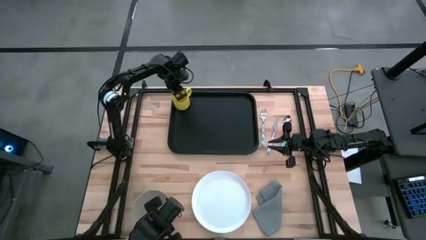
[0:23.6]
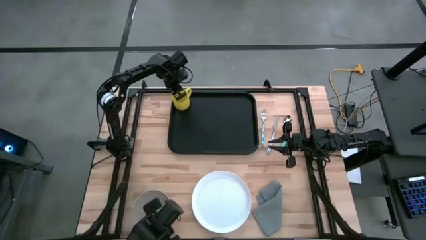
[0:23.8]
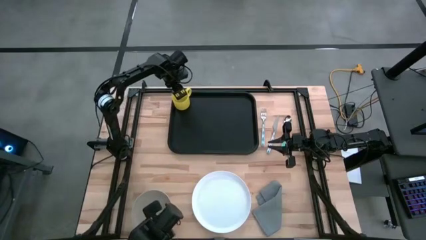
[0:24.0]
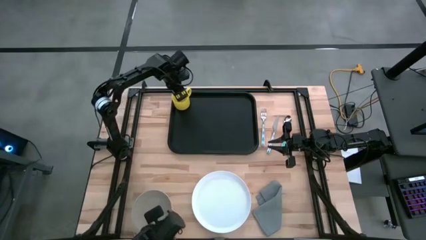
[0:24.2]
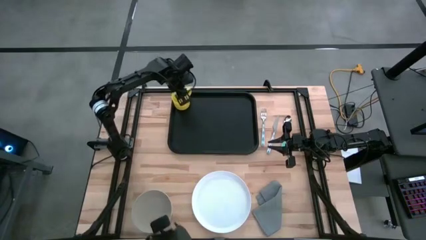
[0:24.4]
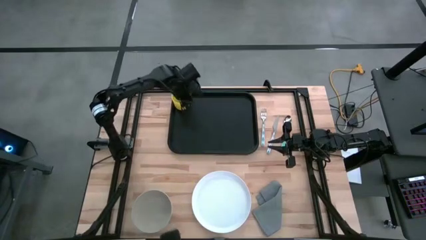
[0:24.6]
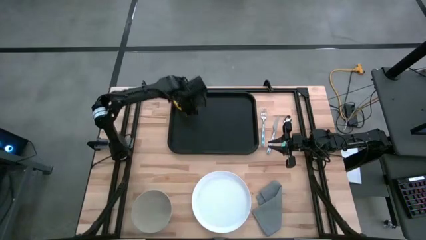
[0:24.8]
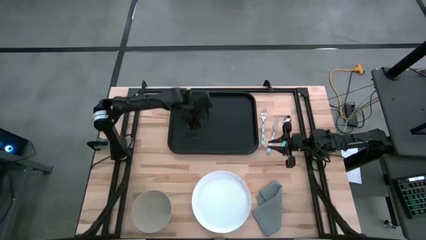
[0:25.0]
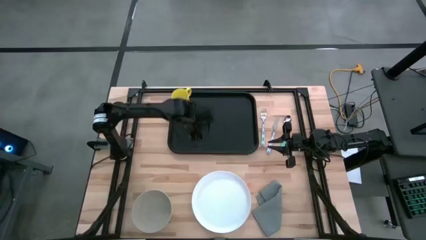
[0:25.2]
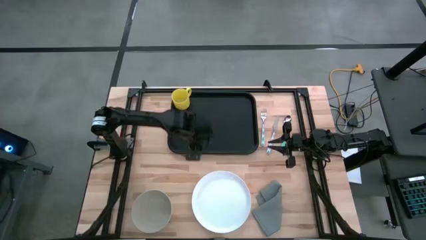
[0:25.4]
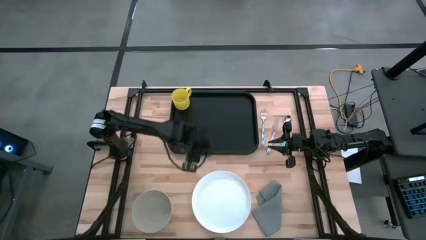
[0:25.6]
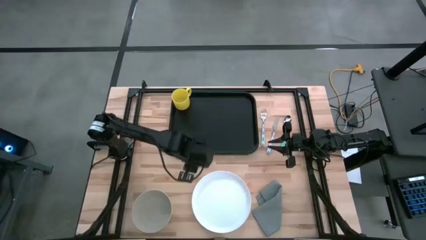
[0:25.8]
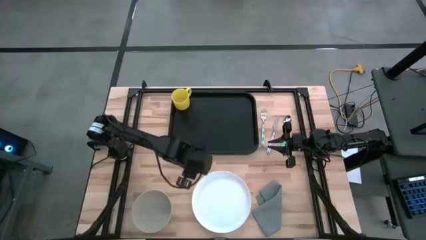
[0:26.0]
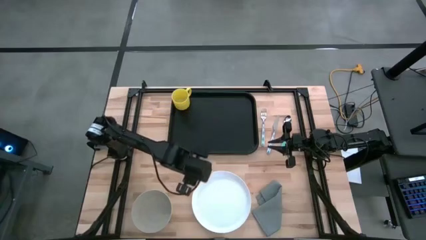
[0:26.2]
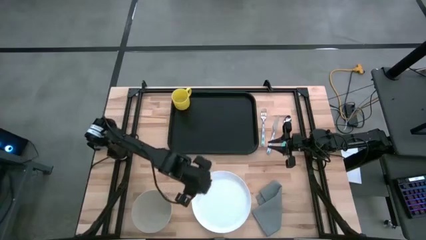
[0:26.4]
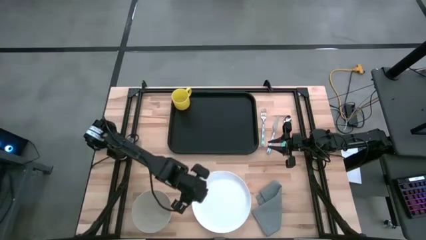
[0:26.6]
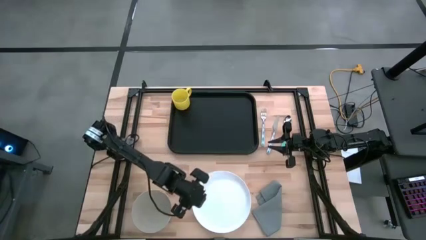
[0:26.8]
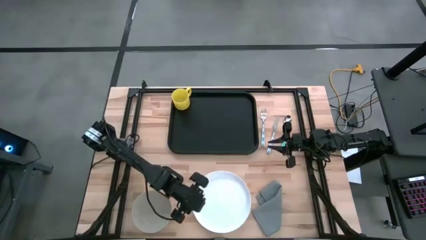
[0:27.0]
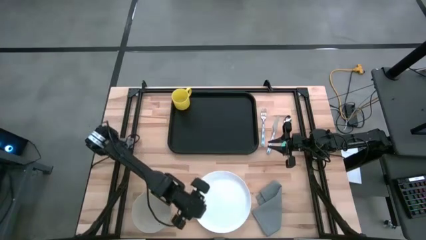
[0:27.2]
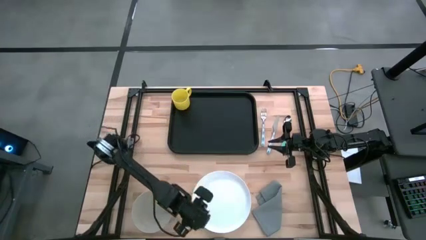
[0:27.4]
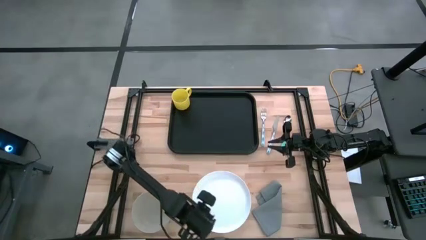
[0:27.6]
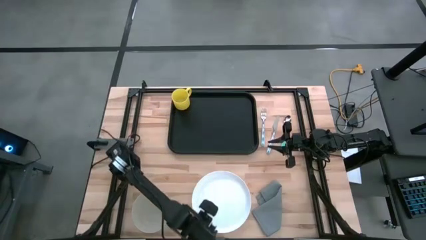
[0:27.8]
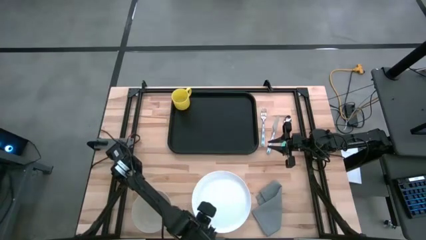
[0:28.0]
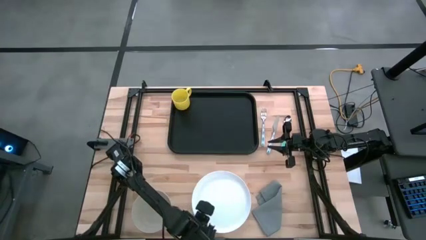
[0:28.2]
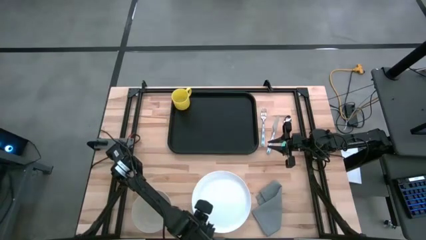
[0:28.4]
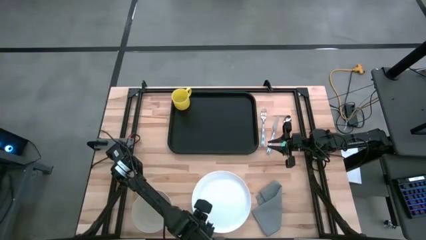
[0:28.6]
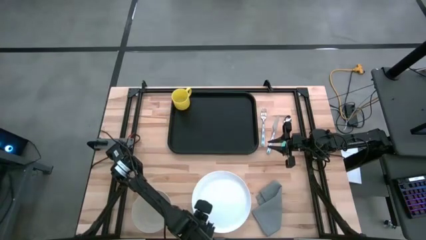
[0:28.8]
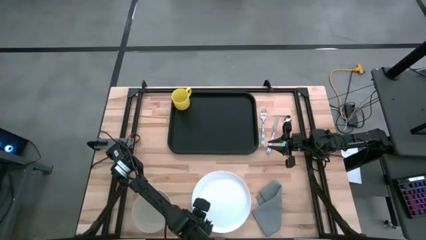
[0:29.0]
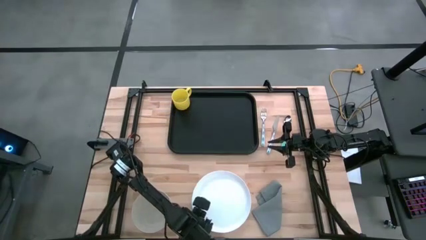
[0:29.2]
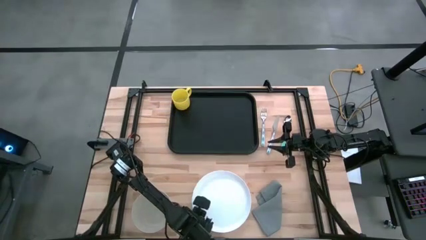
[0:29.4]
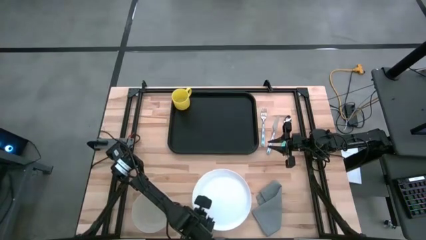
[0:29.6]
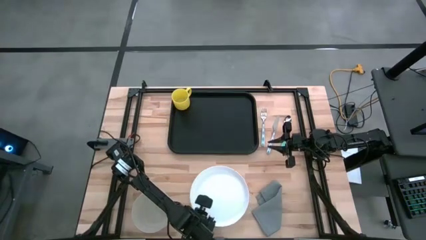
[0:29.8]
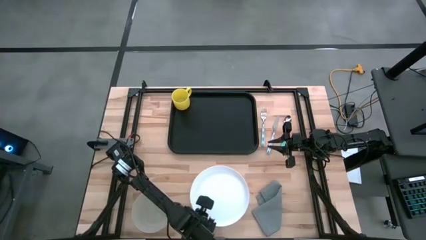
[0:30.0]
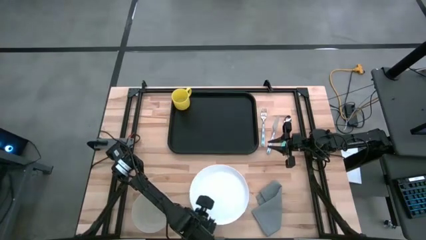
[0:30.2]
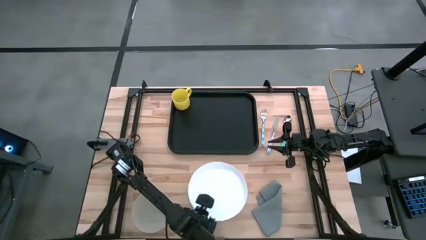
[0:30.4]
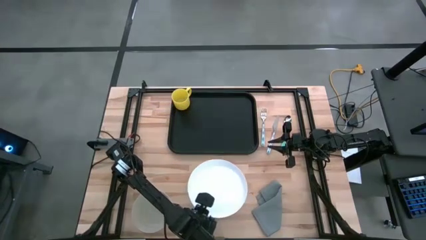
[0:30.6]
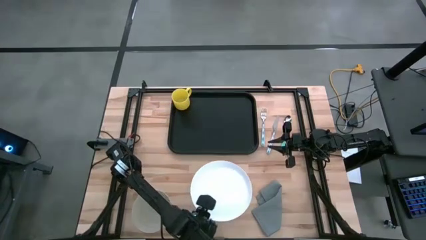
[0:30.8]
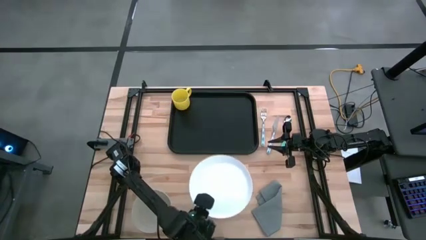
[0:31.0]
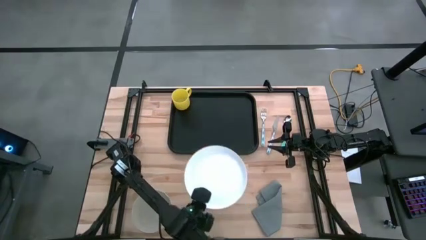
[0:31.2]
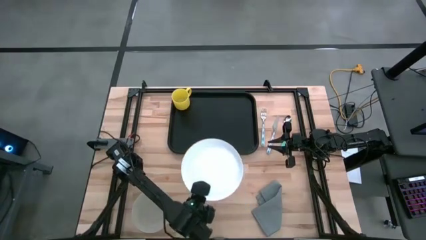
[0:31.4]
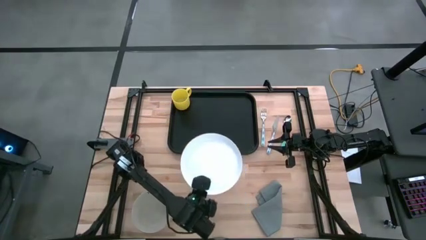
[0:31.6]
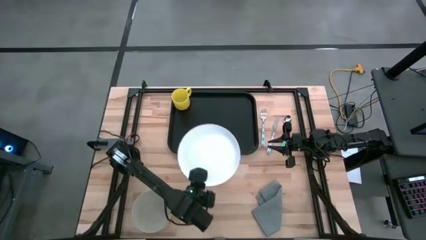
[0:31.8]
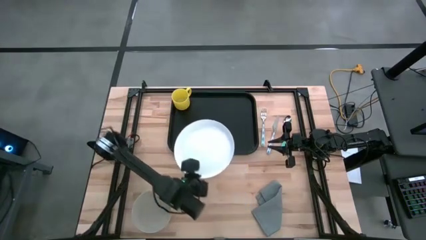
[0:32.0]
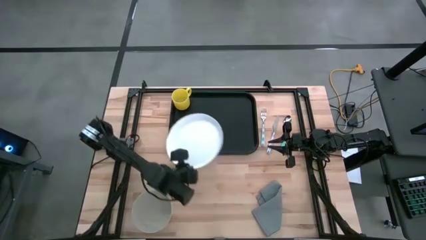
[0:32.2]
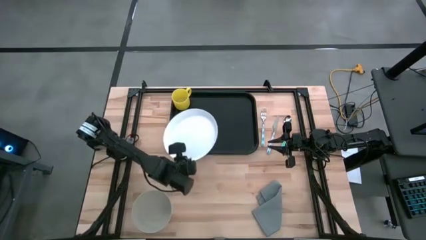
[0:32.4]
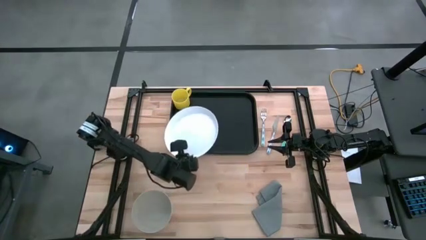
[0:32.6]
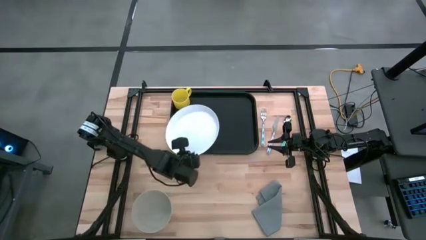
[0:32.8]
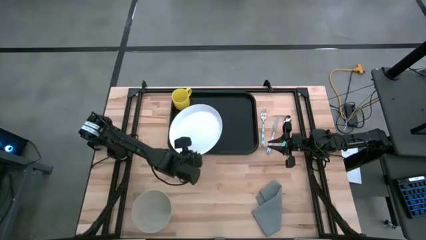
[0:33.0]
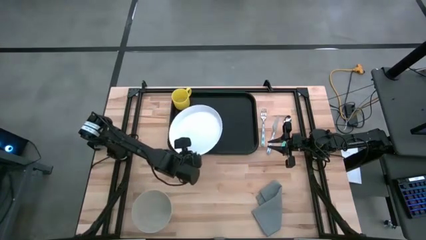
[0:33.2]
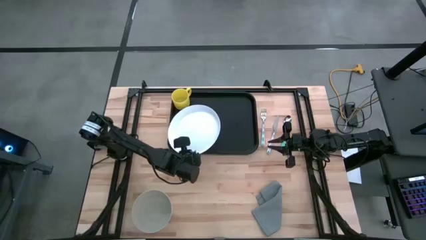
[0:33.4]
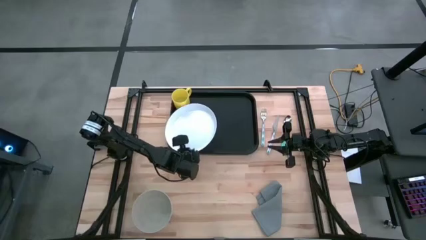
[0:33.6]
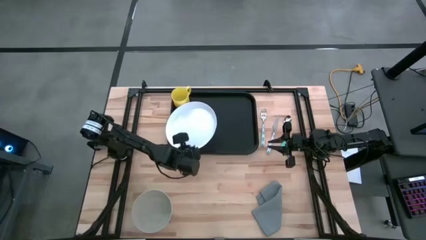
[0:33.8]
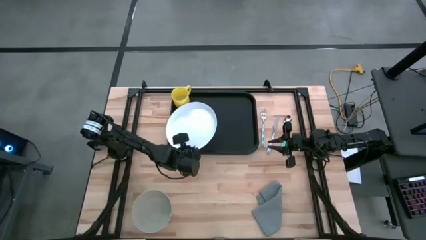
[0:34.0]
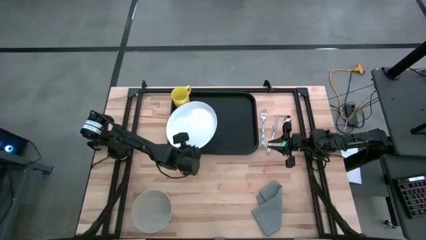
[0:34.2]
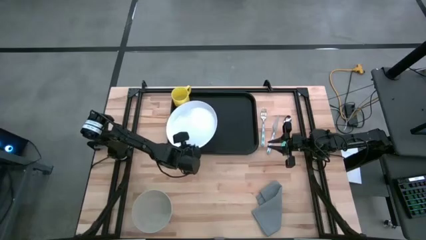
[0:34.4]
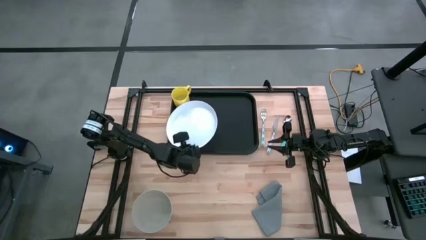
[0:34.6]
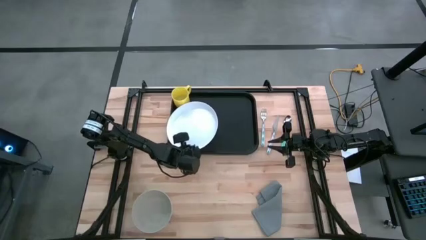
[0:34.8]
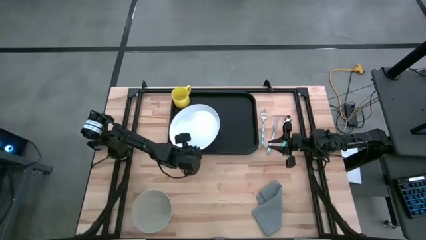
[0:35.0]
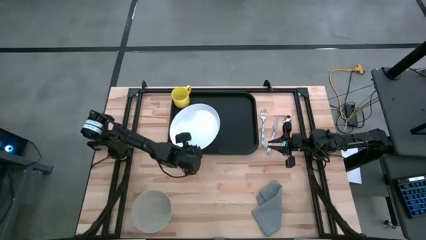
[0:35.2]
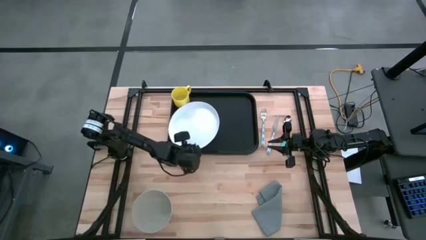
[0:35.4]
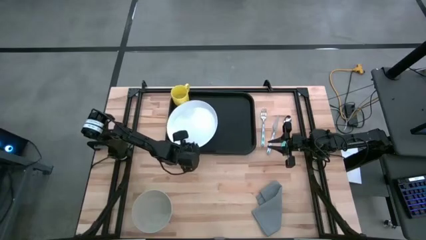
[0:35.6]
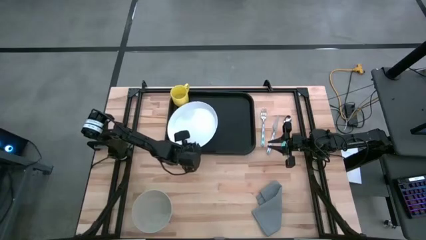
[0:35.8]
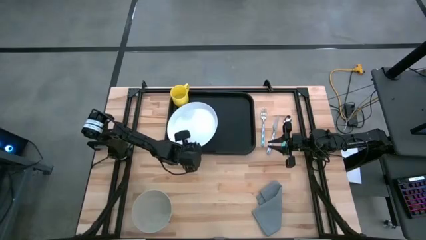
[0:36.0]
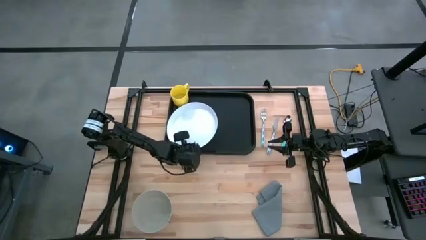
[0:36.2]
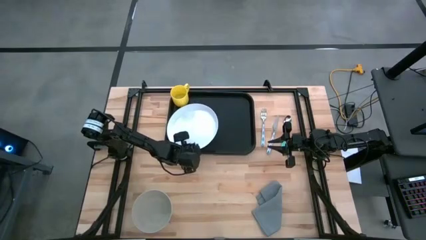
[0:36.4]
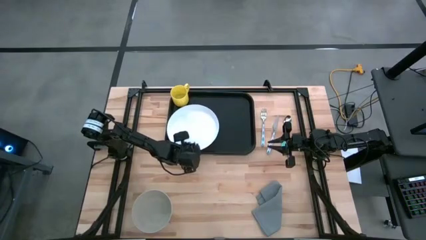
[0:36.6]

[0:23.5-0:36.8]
Task: Set up tray
Put the white plate at the bottom of the yellow cup on the black tray
